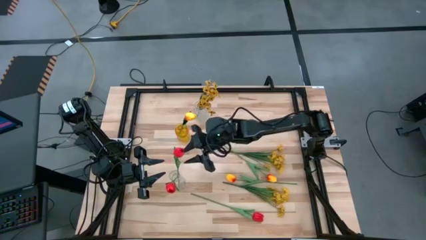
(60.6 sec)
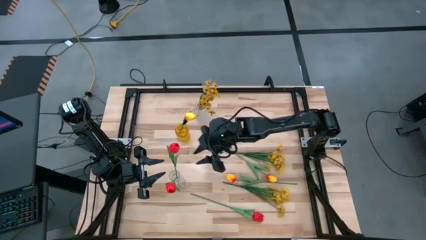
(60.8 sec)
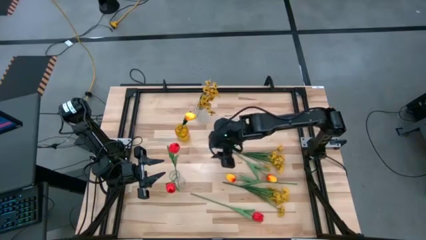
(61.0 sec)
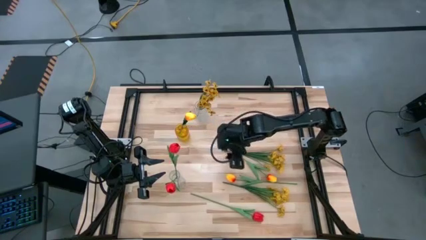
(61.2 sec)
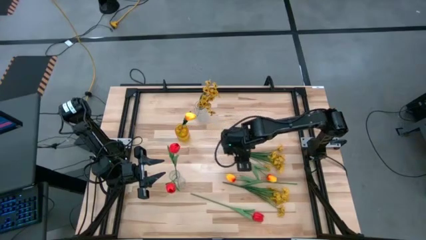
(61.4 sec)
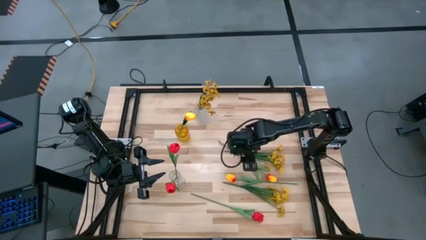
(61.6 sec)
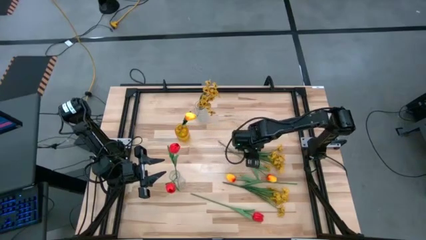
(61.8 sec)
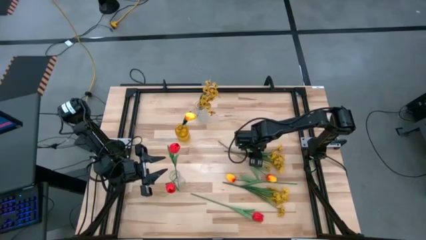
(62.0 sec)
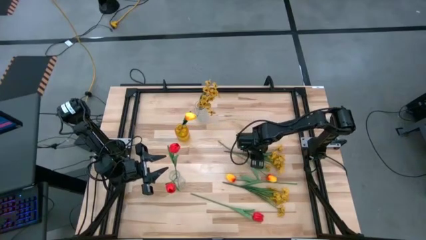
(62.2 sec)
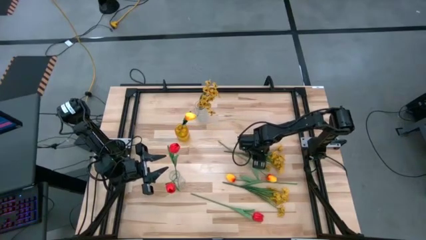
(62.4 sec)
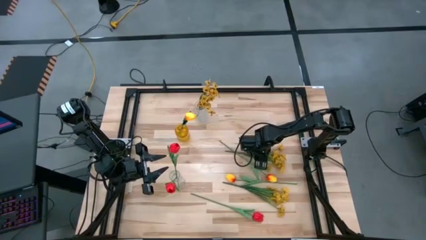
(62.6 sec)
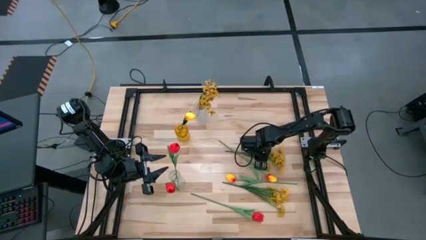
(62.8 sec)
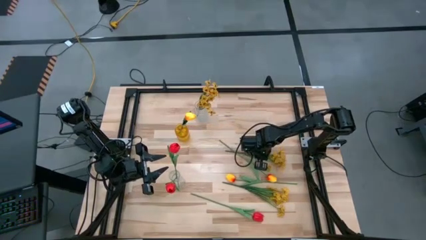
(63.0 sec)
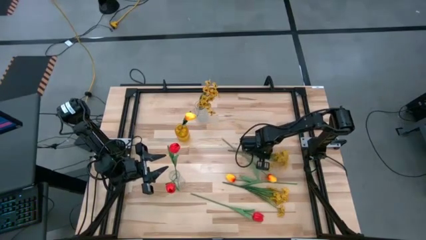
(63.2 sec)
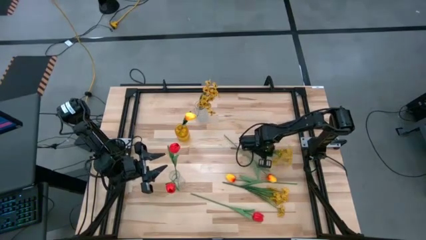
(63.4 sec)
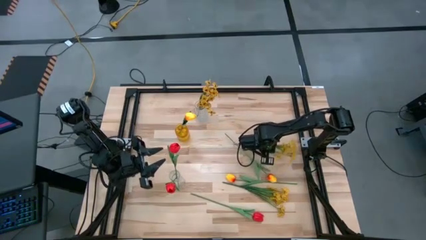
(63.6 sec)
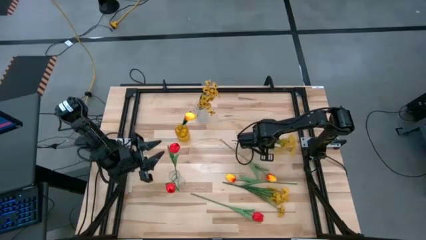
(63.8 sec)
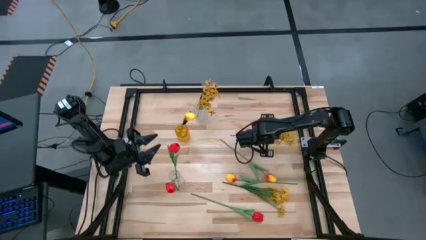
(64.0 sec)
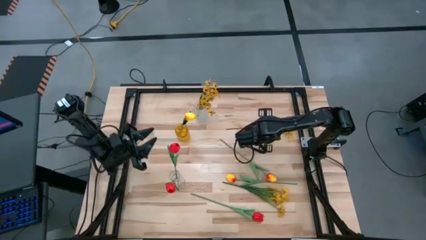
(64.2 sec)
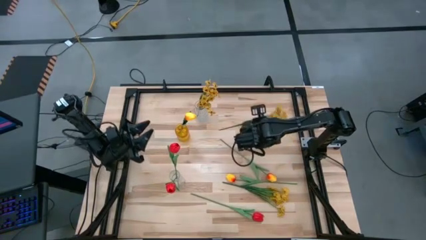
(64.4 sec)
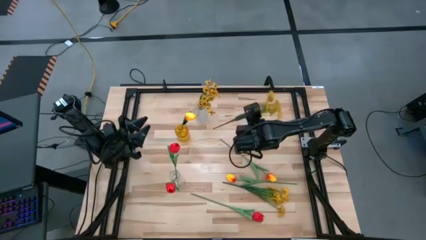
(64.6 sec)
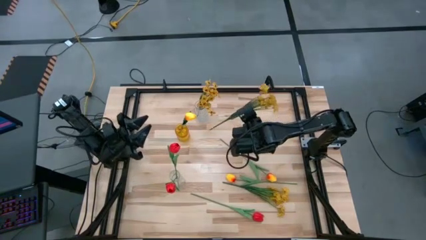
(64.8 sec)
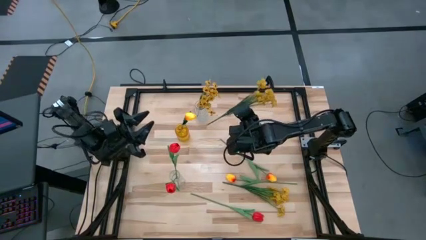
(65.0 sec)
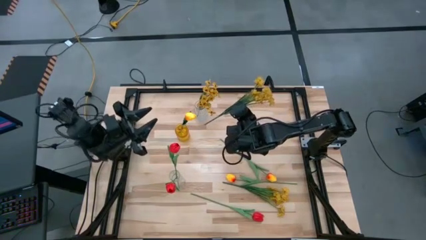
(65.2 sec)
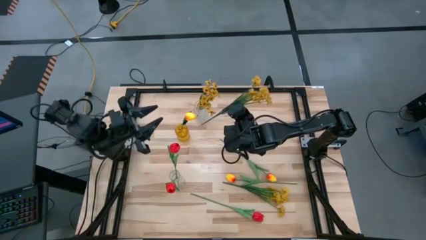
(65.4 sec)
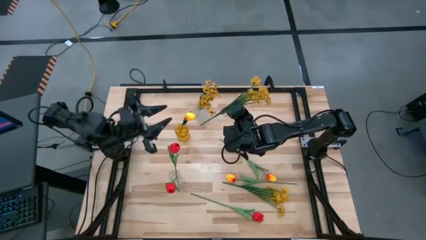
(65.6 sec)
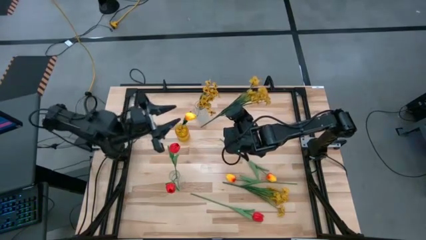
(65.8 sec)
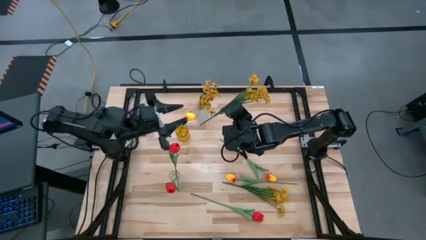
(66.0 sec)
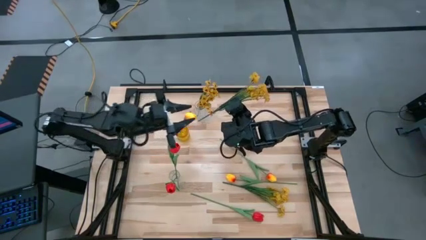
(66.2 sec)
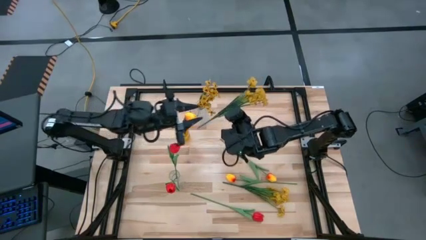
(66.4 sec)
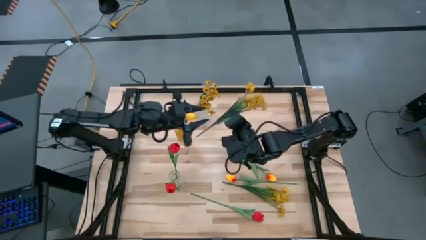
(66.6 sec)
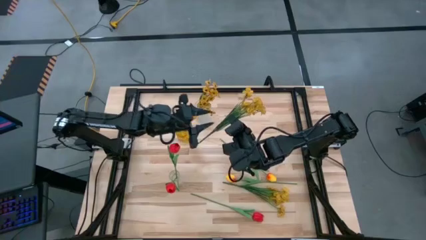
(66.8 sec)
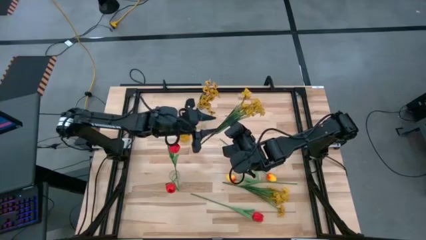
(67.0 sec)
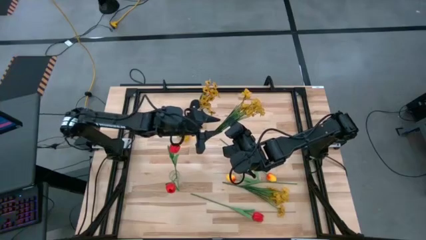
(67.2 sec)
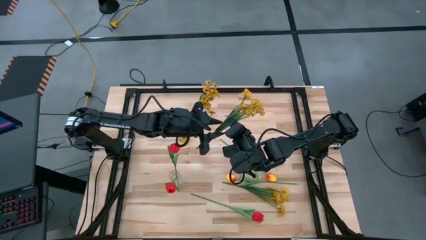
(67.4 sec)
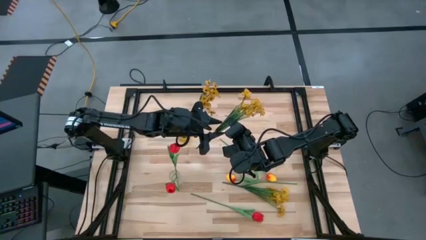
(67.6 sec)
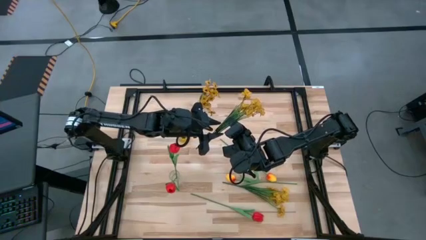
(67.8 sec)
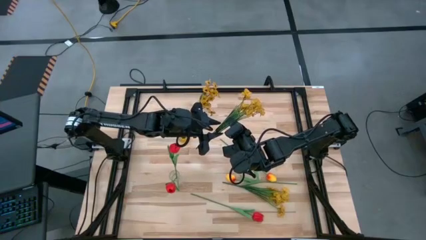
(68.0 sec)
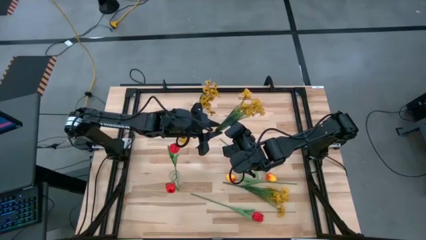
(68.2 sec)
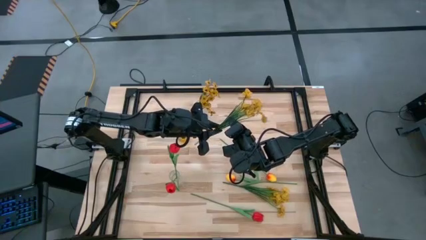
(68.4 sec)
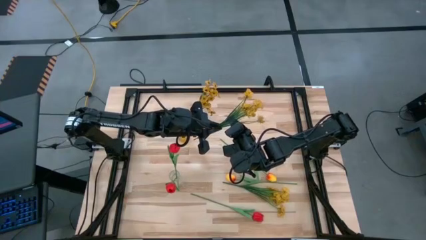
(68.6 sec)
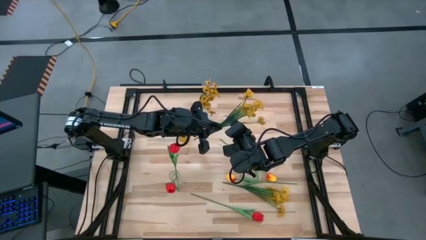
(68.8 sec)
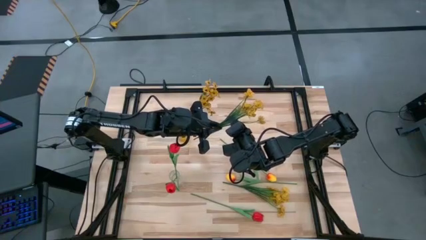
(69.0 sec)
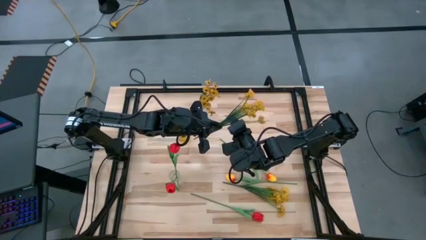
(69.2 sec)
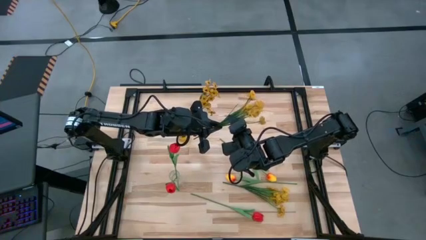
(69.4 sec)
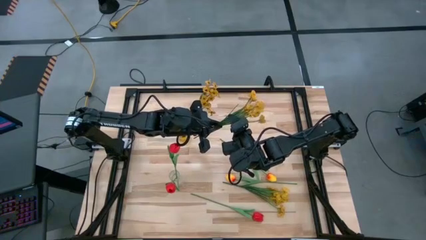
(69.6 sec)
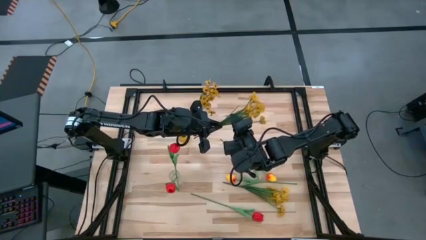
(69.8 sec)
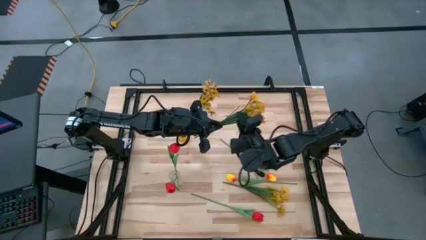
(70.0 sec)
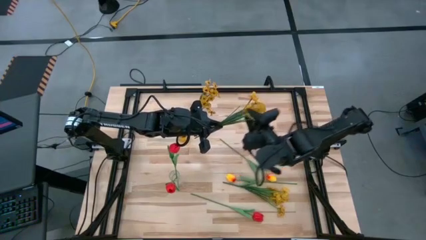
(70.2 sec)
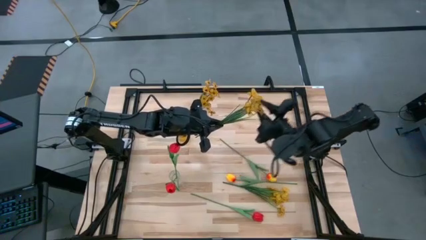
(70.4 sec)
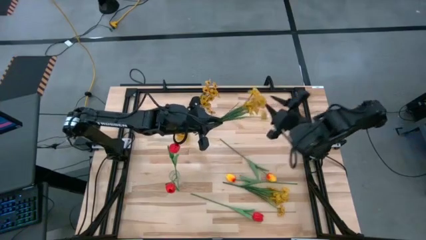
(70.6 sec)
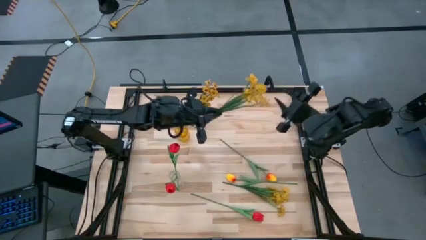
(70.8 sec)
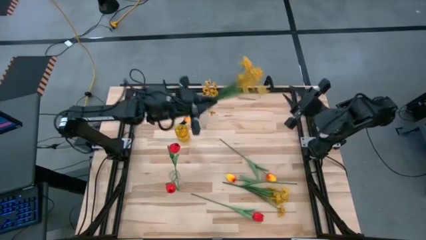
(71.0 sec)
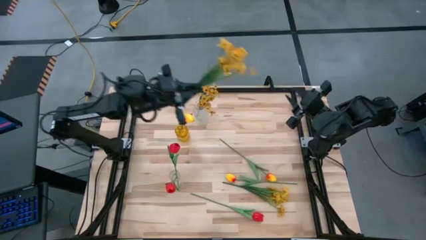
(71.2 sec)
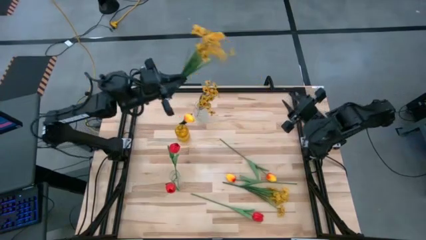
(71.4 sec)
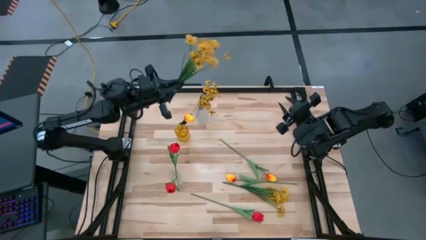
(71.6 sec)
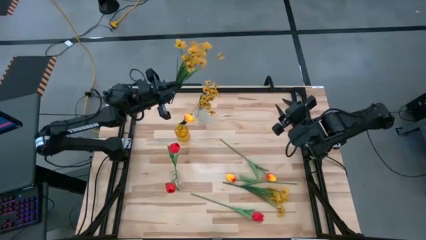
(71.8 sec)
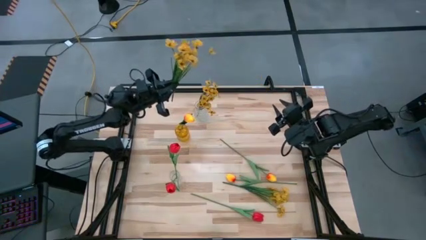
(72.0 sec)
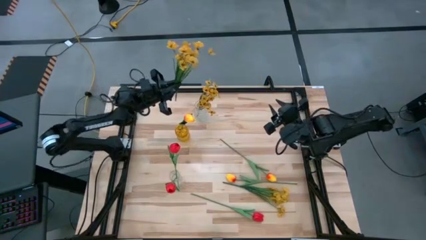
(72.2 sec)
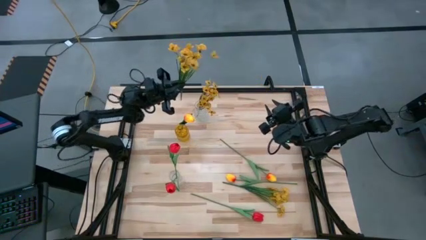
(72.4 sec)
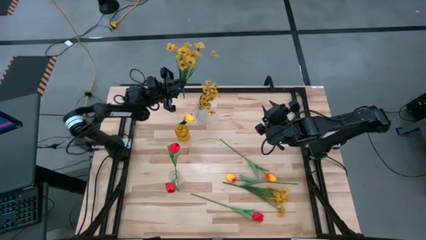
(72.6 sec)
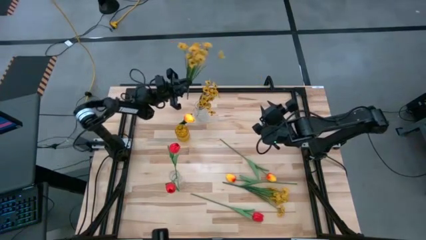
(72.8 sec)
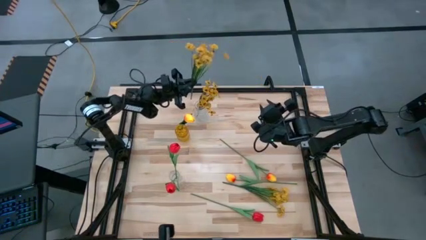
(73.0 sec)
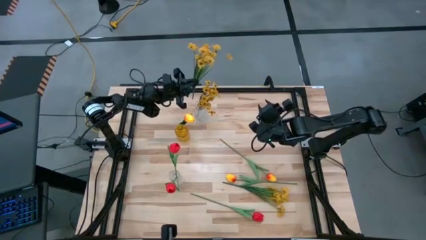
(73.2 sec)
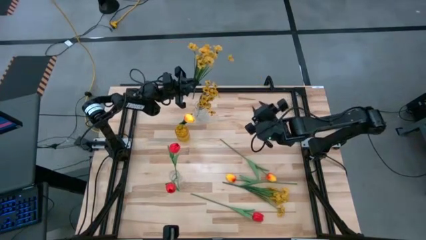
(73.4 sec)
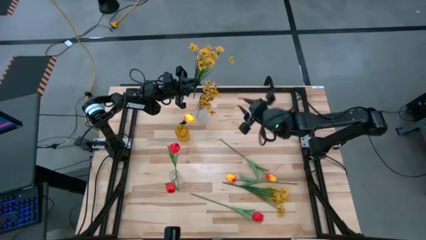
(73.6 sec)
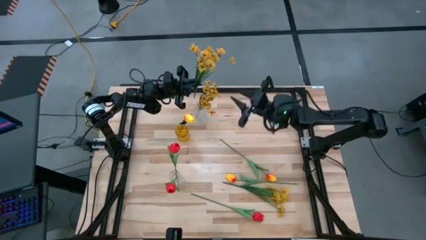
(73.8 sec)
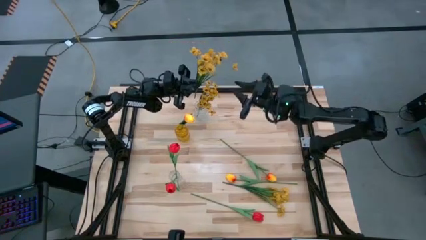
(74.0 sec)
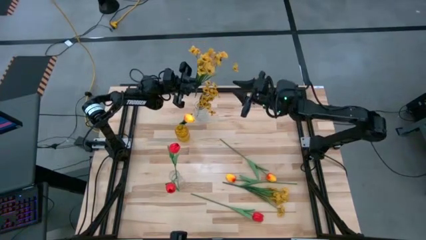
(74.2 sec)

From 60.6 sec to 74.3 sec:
Task: Sort flowers into vase by color
Put the top yellow flowers into the top transparent vase
